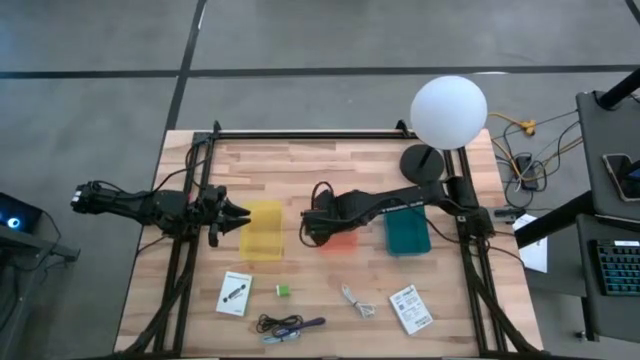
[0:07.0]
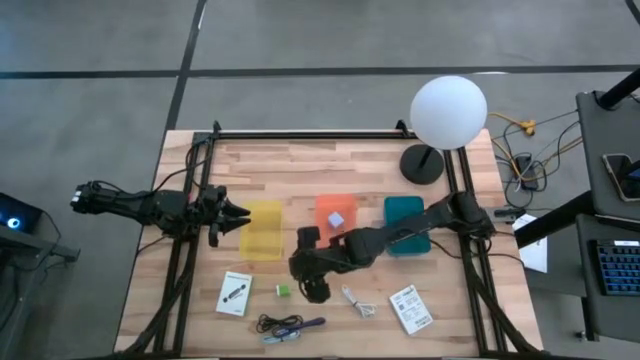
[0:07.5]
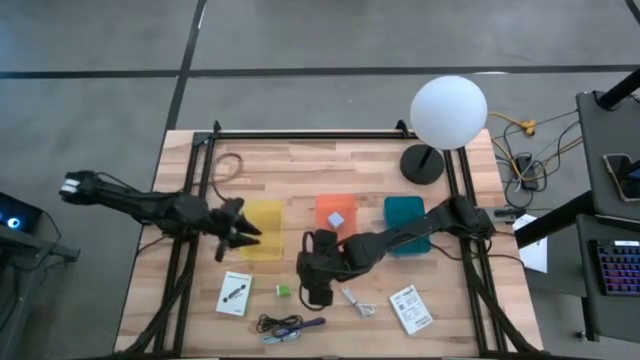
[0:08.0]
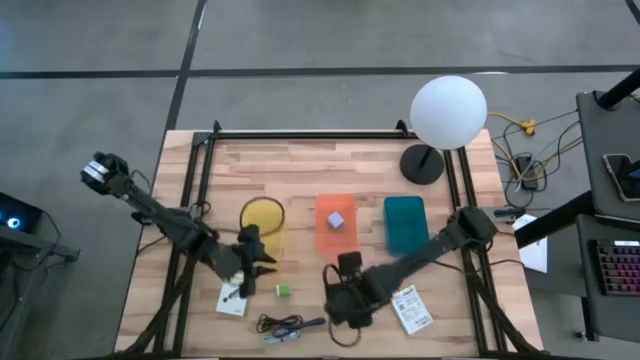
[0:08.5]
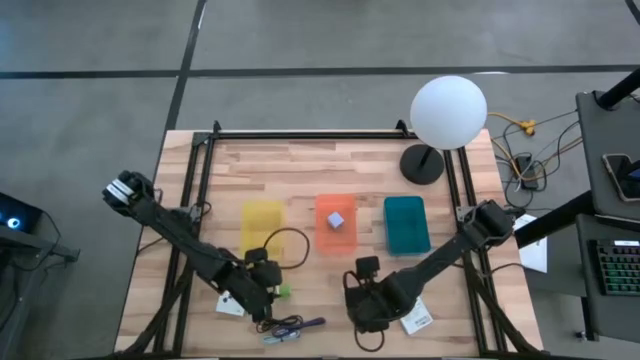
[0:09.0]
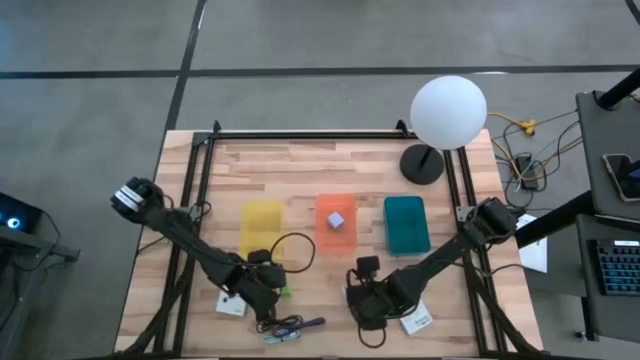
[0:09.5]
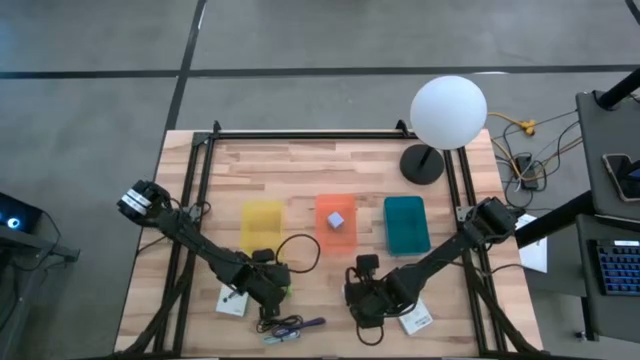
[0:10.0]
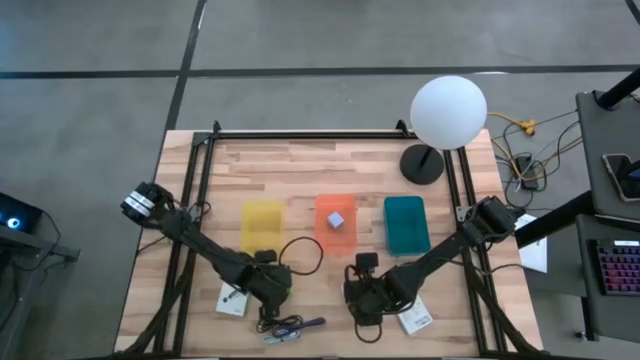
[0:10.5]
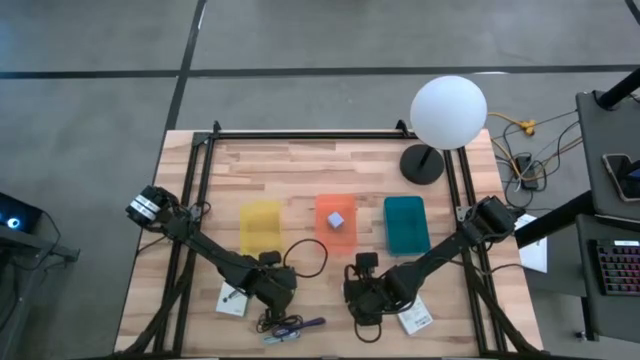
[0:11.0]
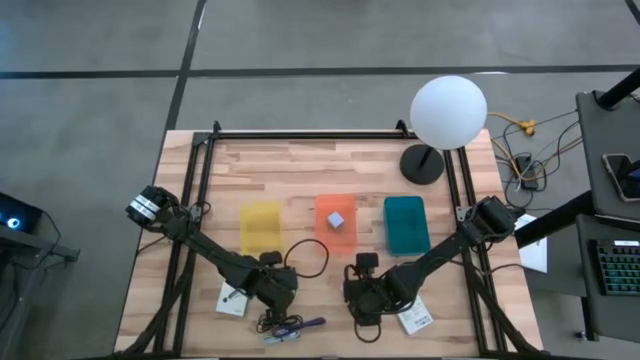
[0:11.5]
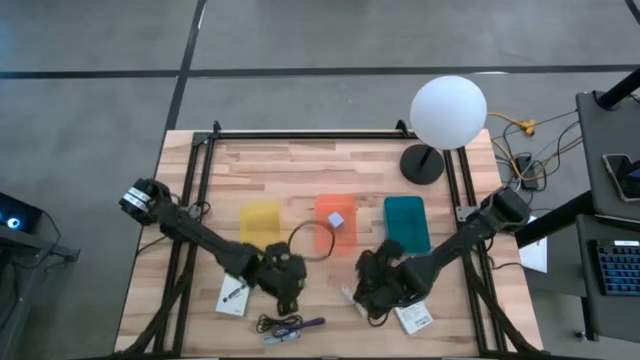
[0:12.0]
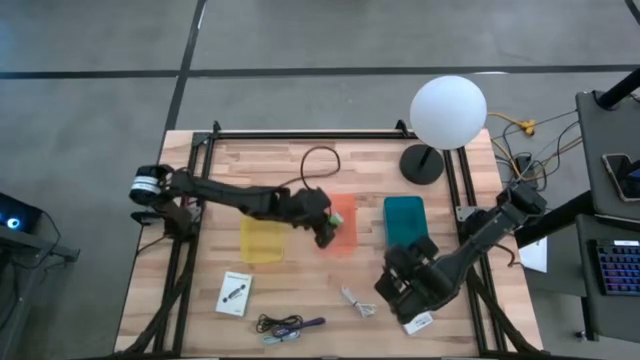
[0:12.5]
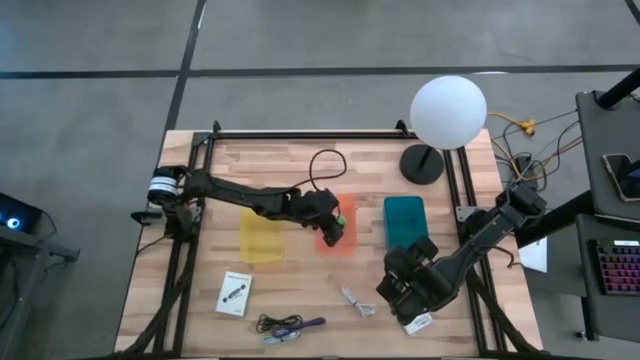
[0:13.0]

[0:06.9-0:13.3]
Task: Pick and place items into bin
Put the green charger adapter into the orange bin

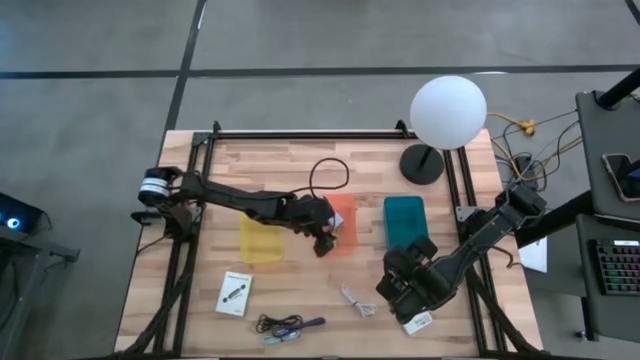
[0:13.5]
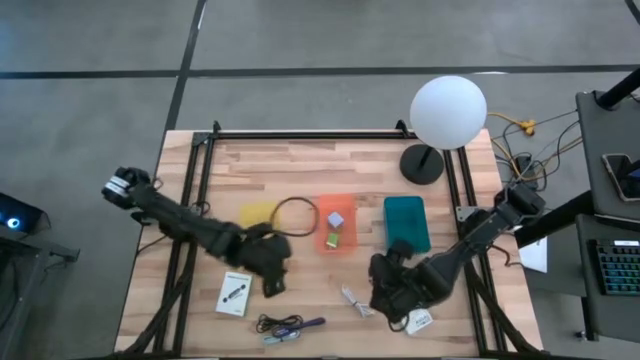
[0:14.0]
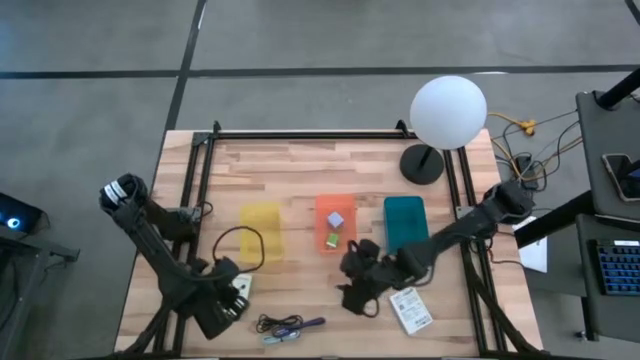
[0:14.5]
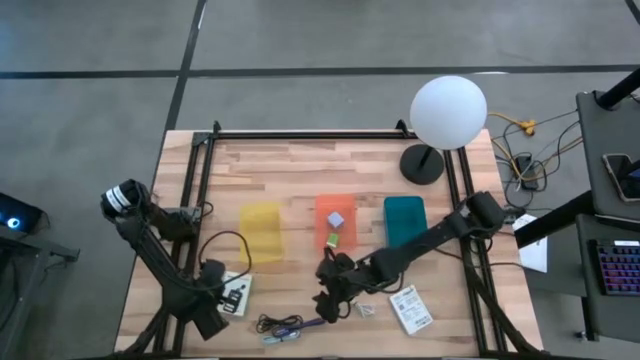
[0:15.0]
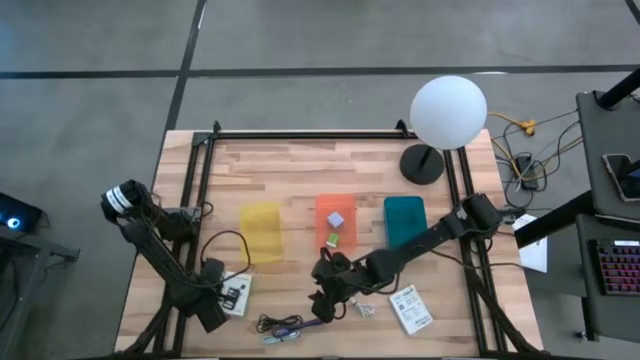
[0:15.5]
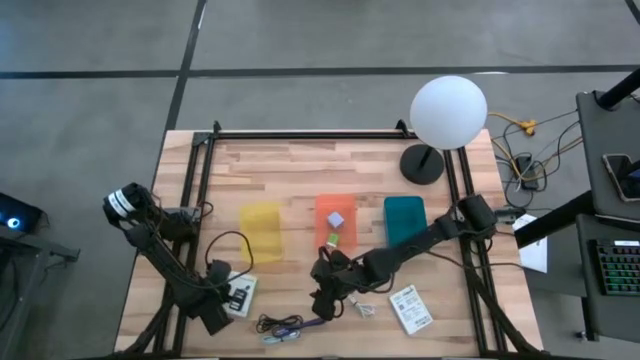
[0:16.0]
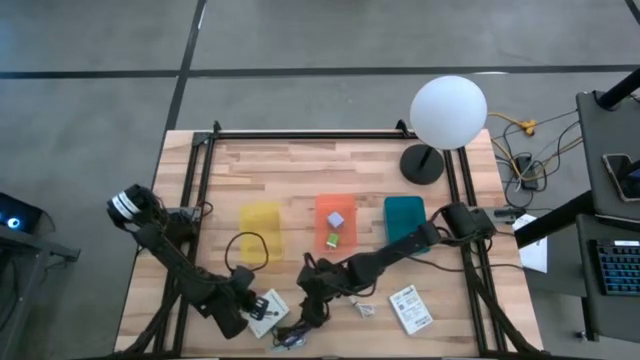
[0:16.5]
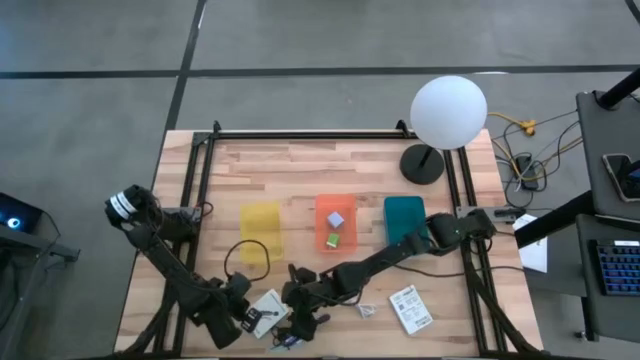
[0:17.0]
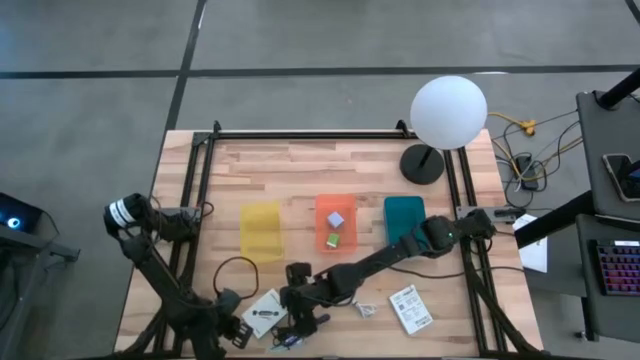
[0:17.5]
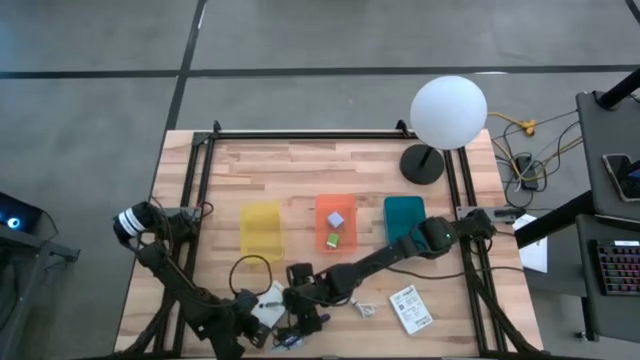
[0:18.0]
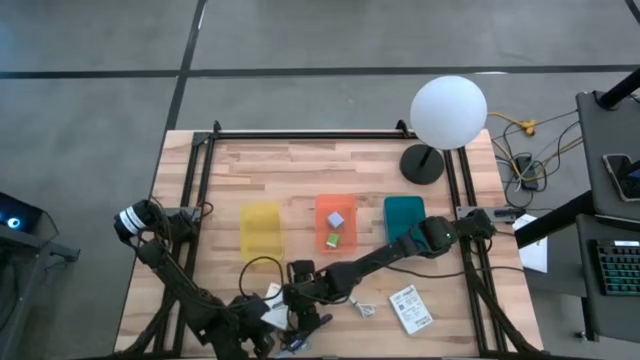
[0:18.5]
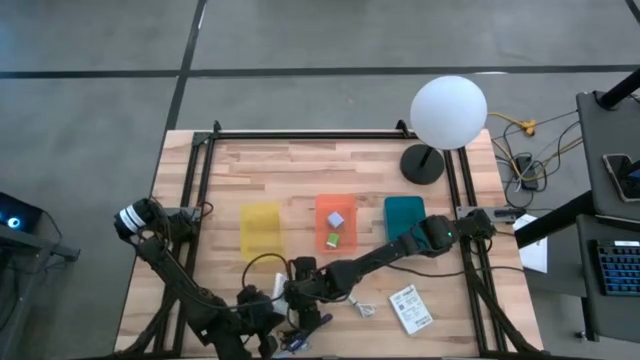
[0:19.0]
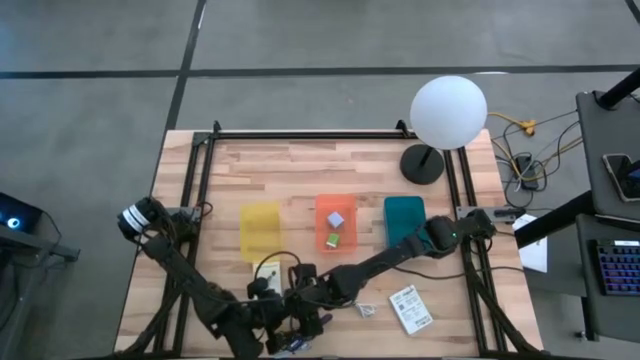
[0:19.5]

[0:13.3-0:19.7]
Put the left white card reader box into the blue bin

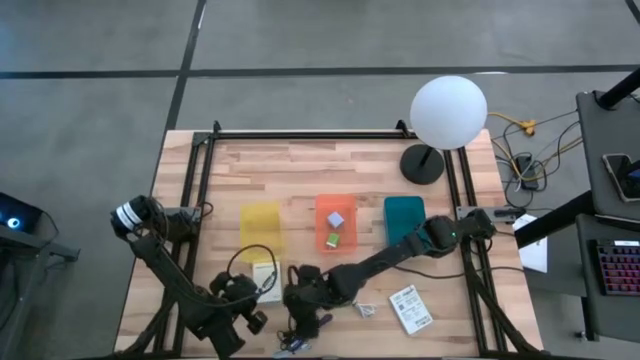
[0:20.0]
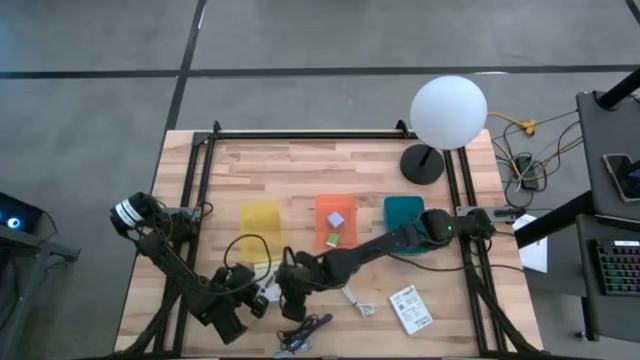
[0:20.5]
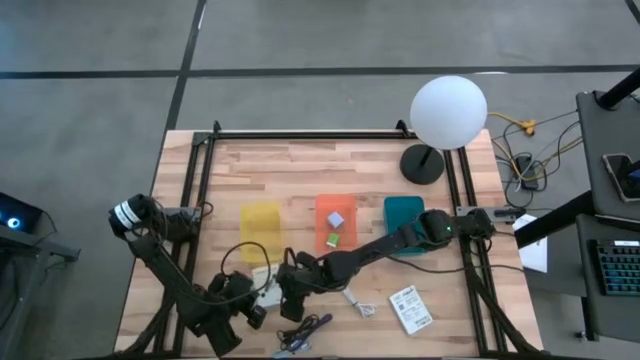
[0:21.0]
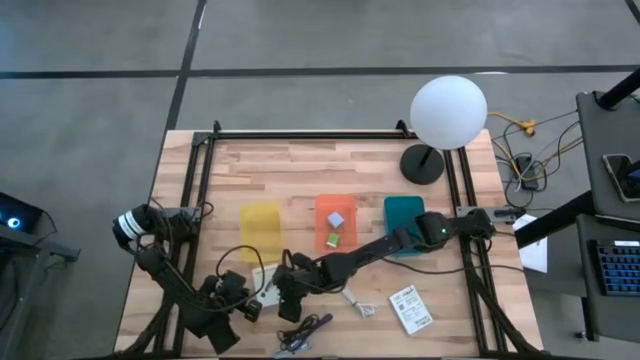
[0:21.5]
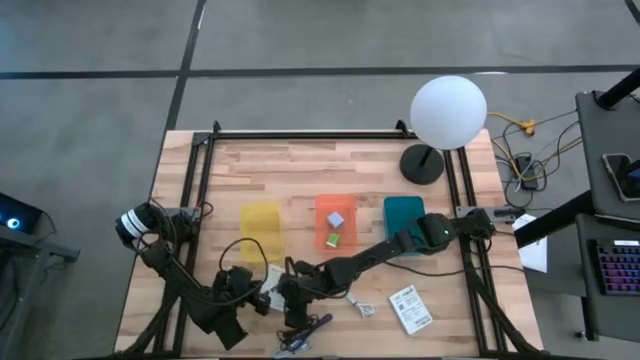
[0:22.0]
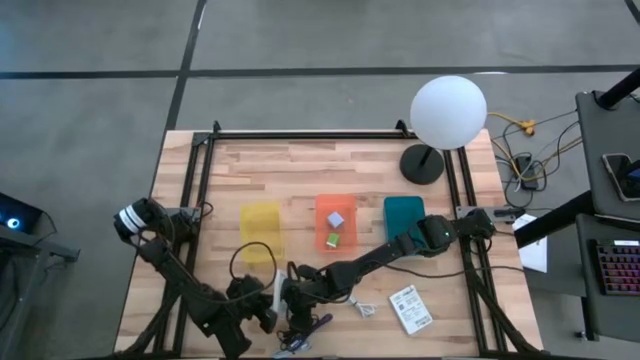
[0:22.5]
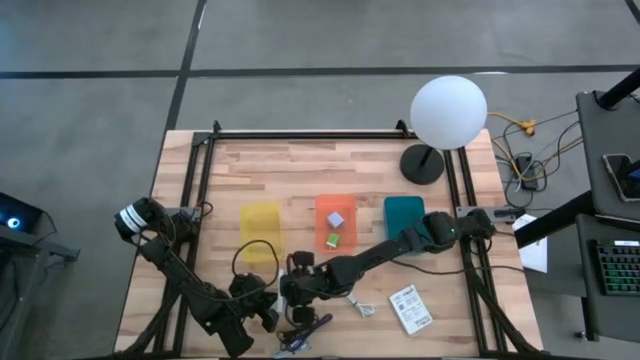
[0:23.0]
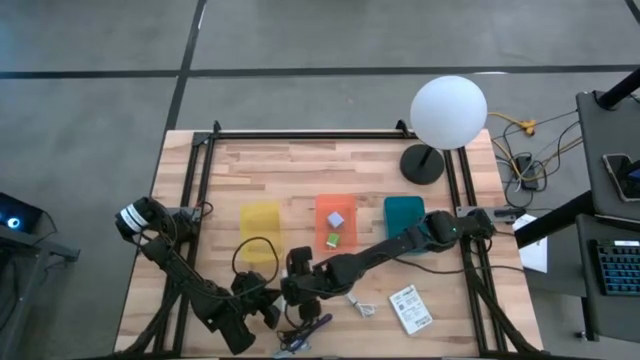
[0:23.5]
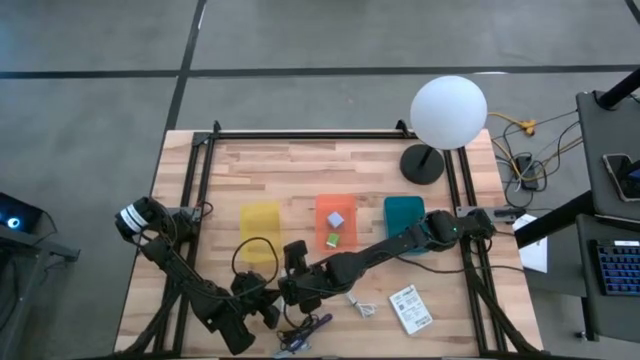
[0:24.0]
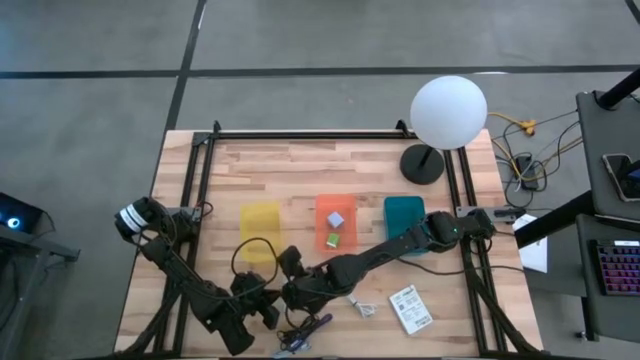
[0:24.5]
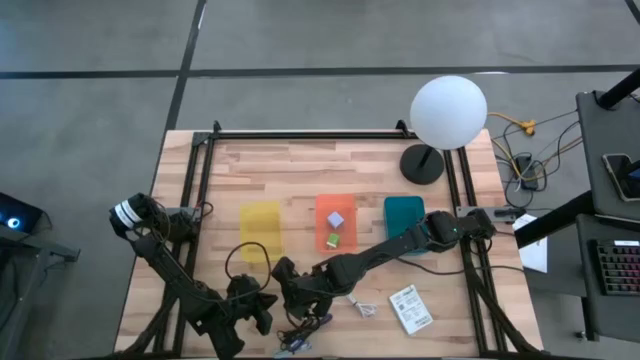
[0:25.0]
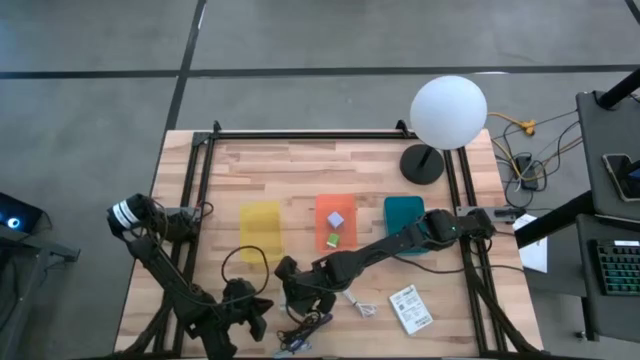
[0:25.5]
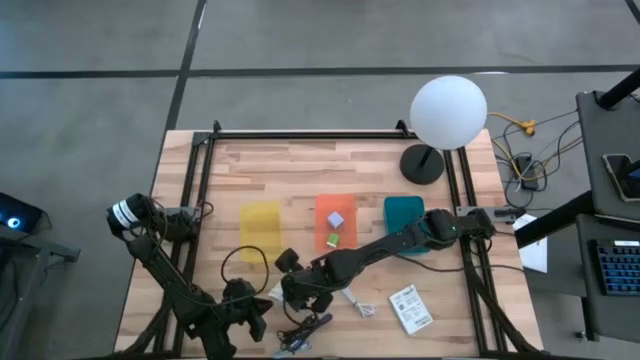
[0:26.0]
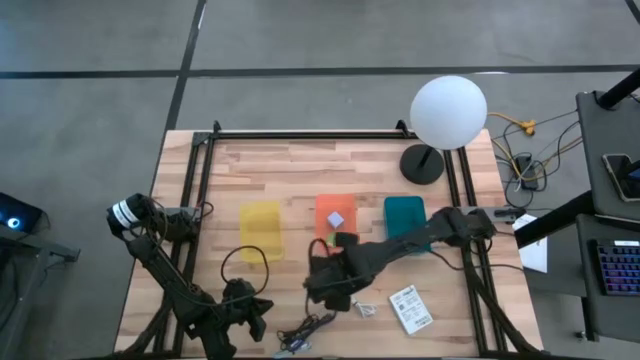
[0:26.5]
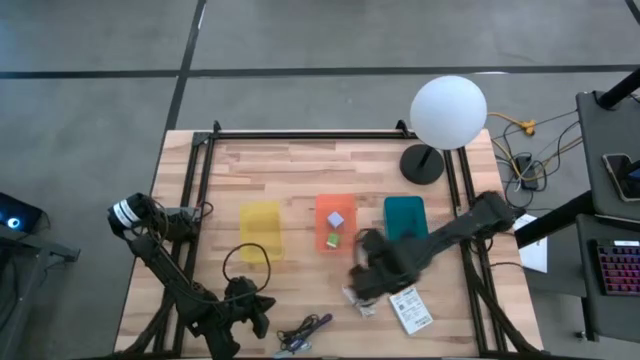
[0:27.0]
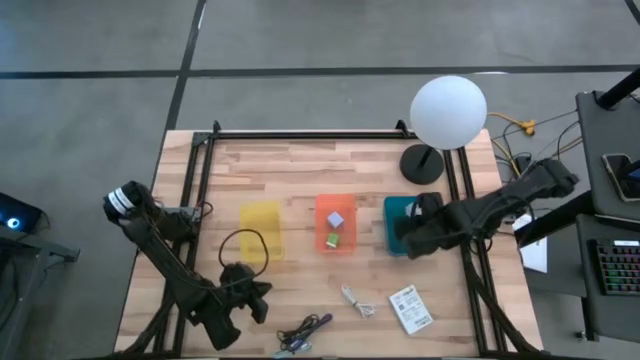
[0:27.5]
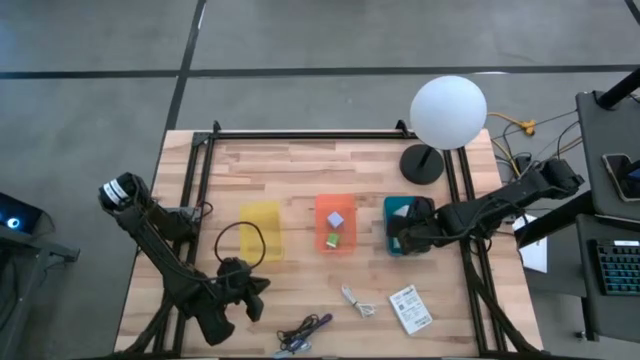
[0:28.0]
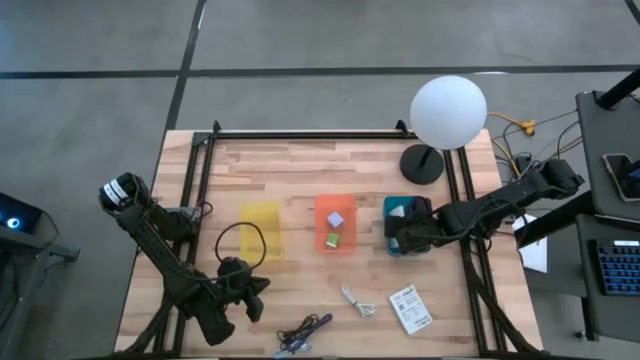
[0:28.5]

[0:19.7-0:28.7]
Put the left white card reader box into the blue bin
